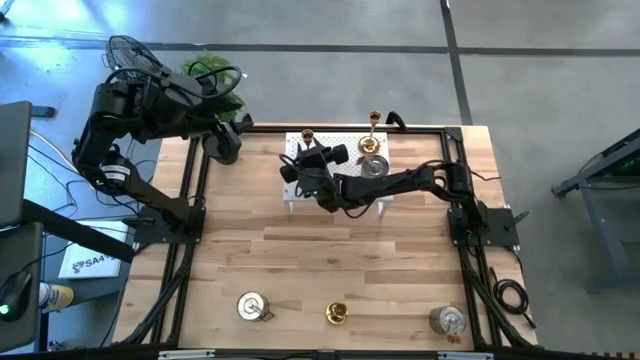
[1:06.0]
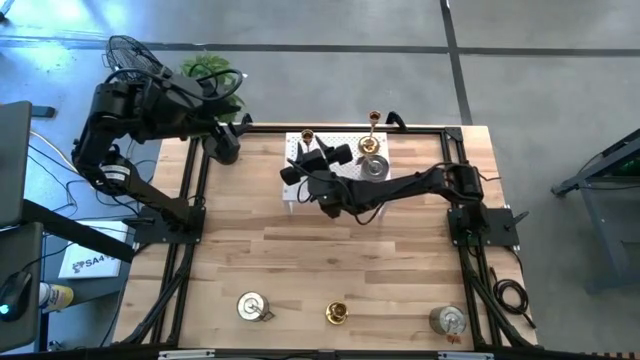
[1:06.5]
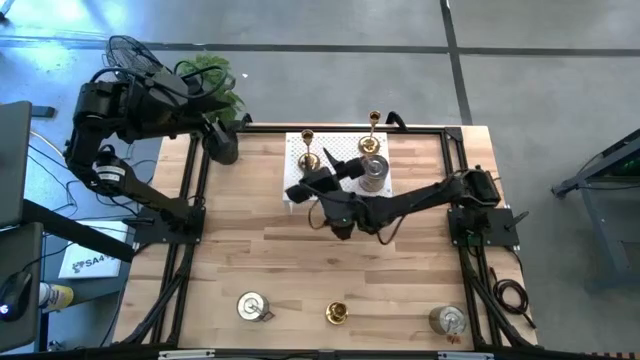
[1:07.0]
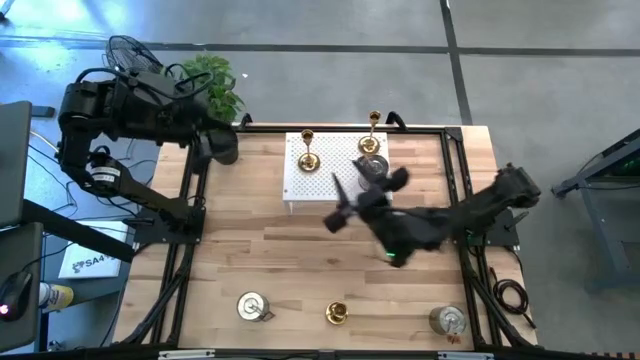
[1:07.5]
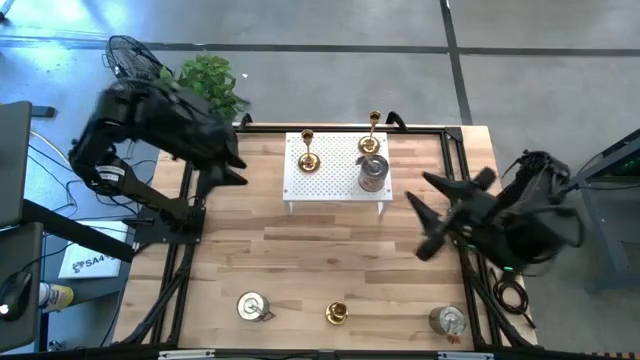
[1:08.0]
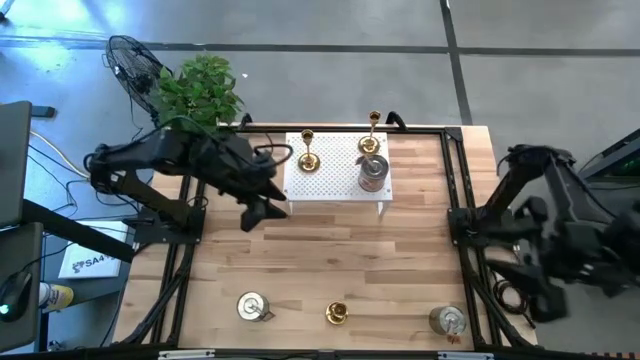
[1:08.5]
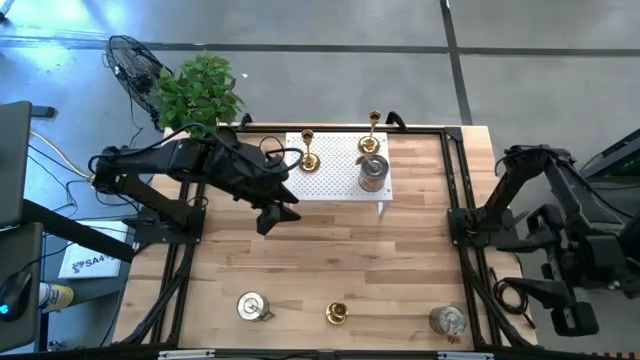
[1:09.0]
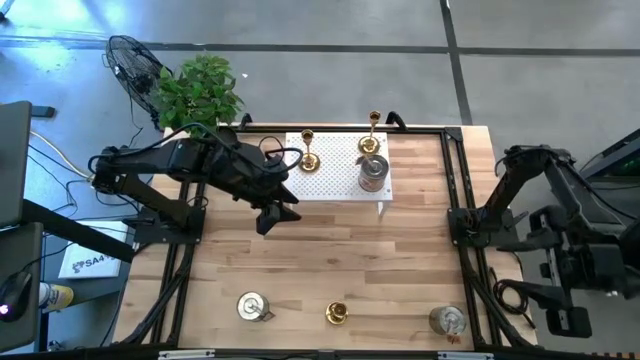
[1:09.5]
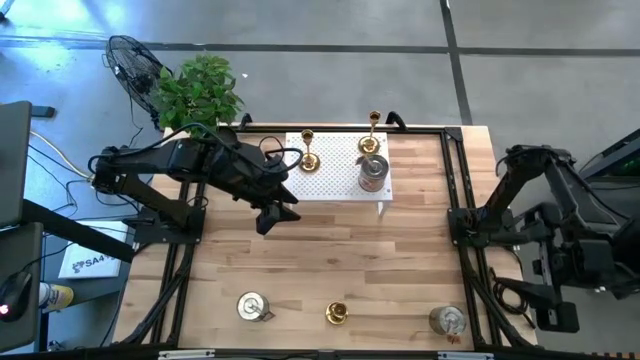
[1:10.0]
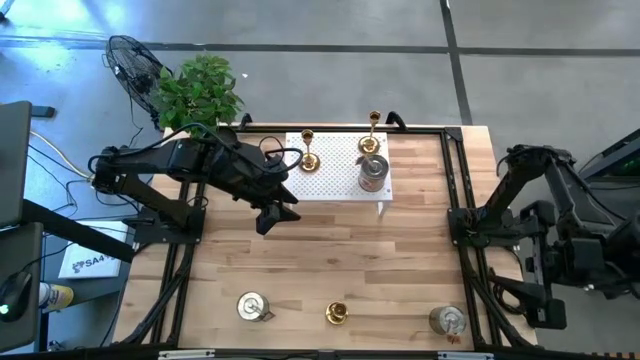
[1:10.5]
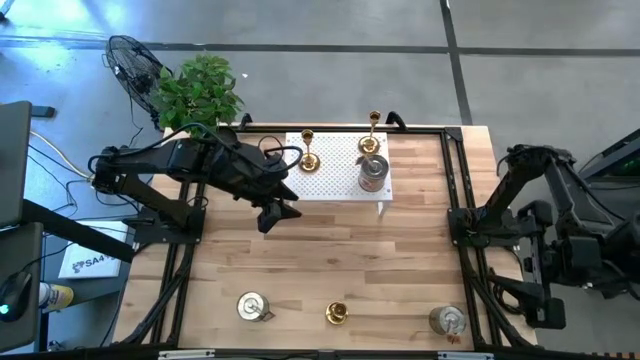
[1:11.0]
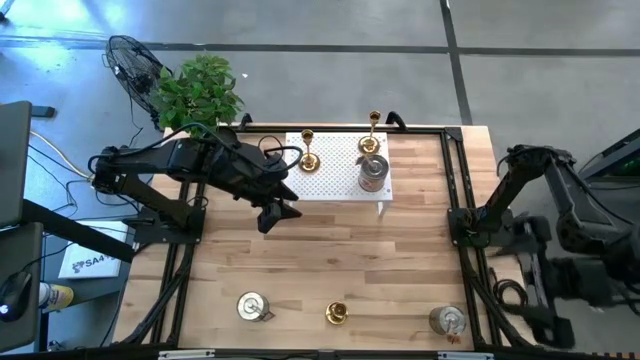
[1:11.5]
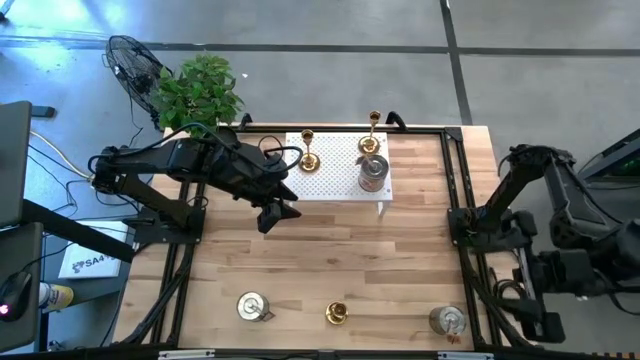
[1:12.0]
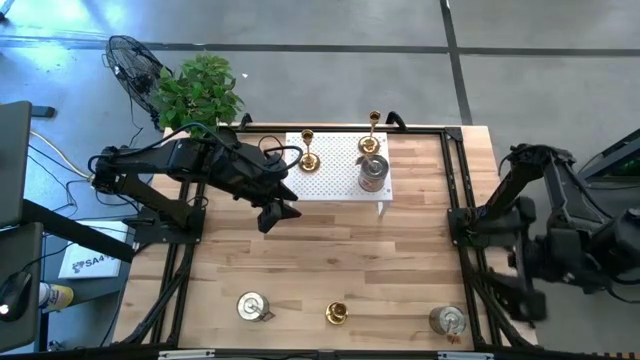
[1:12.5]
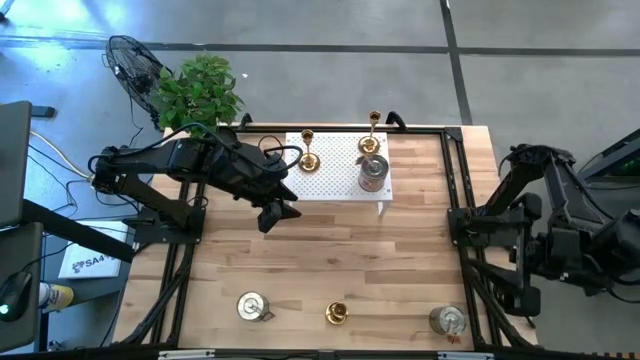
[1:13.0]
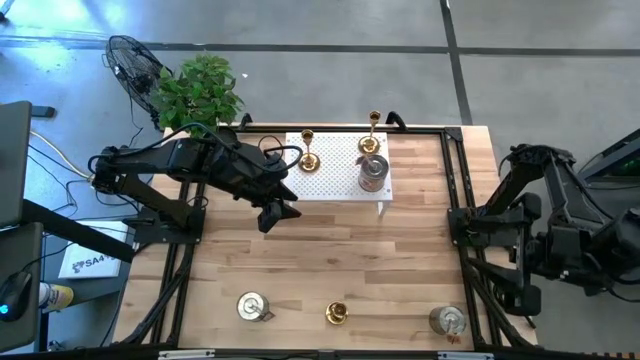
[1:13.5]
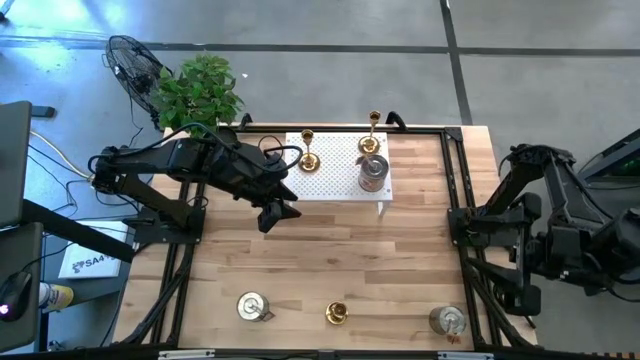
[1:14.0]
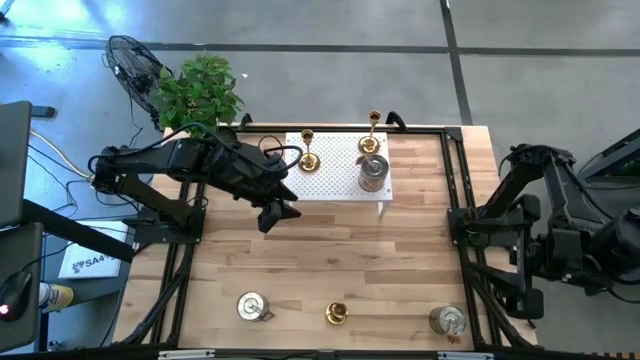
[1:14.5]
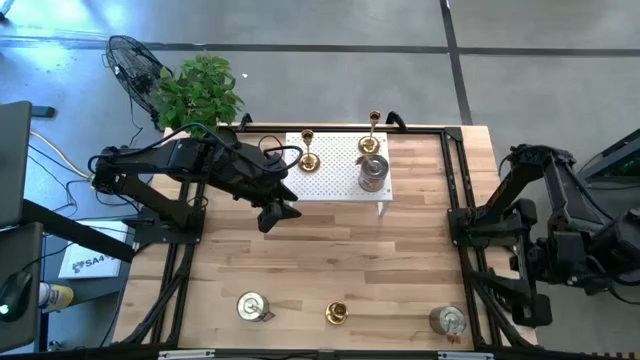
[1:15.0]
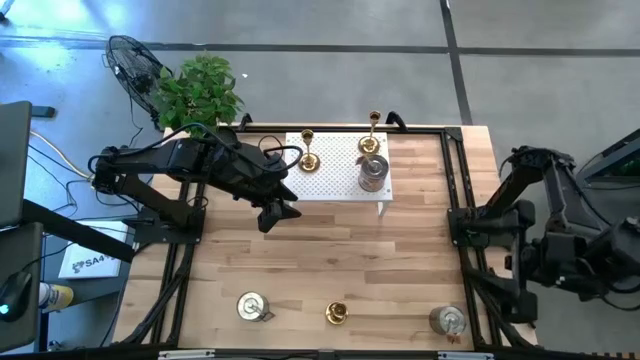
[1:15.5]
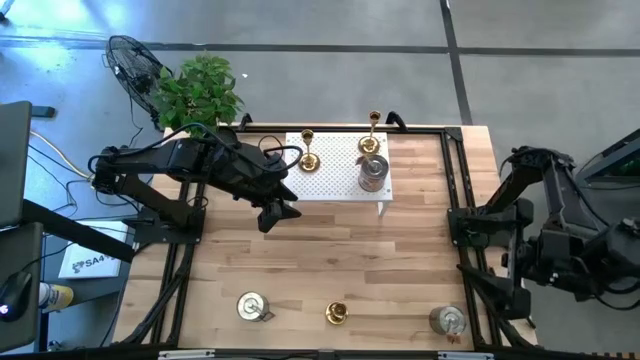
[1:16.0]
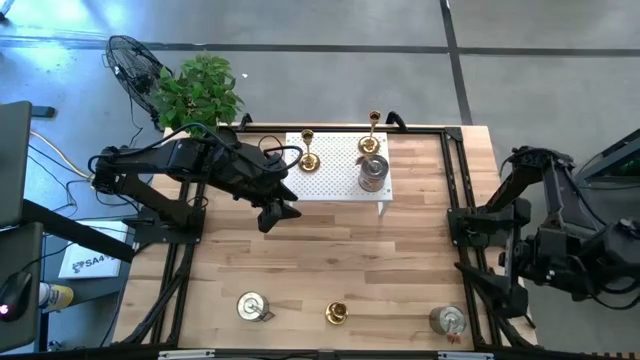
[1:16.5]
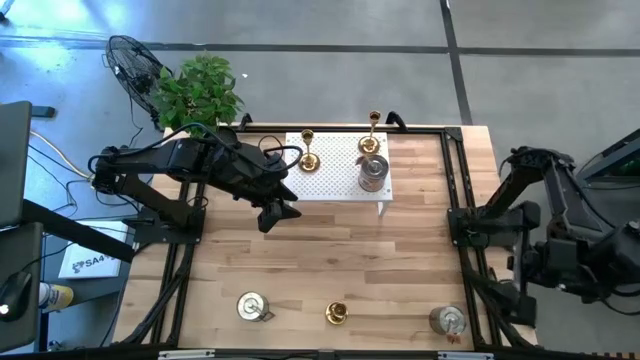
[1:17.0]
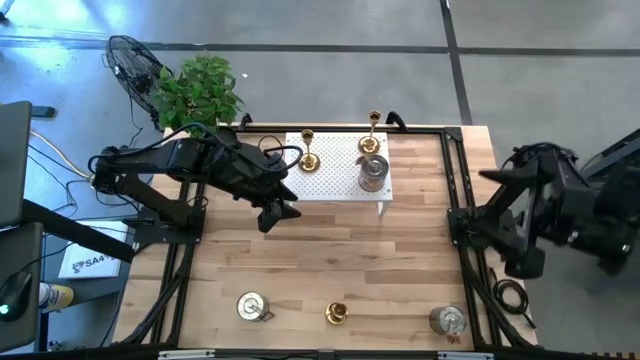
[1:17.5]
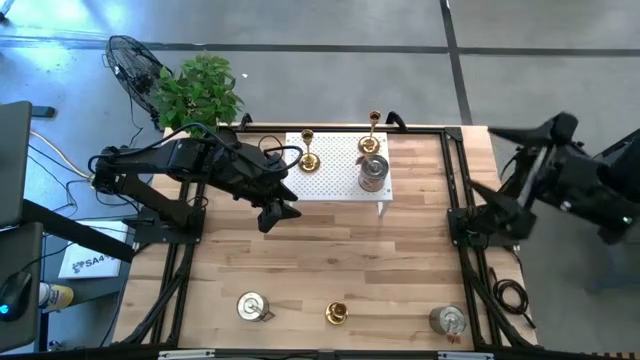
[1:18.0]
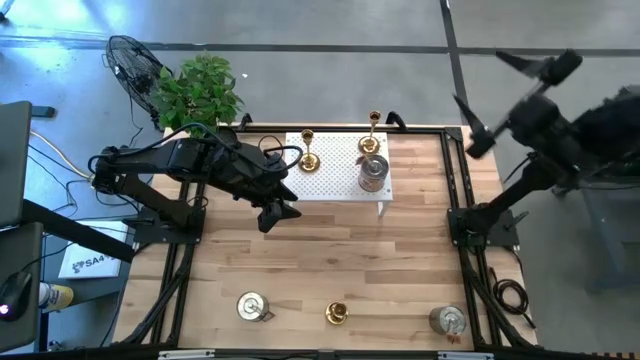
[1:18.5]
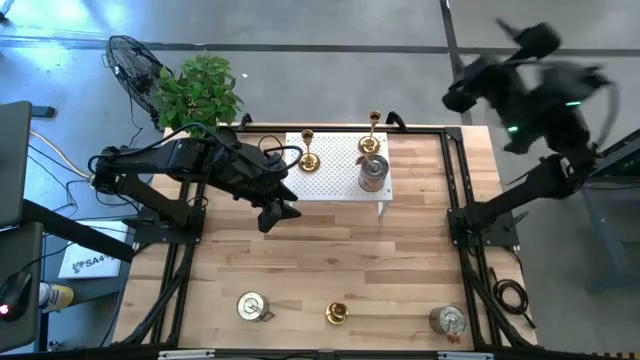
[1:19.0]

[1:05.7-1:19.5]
Task: Pick & Place candle stick holders
Align the right silver scented candle with the other silver scented candle on the shelf

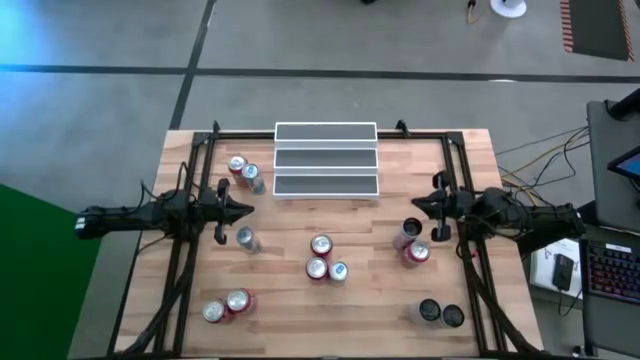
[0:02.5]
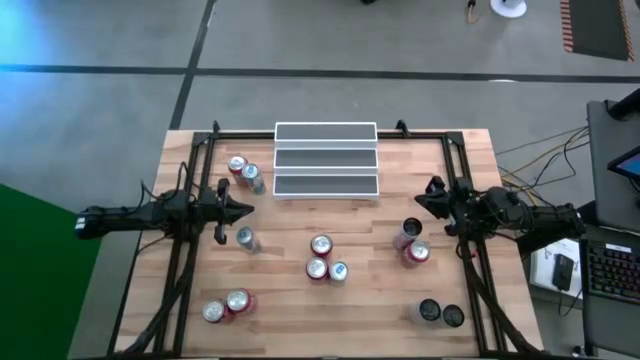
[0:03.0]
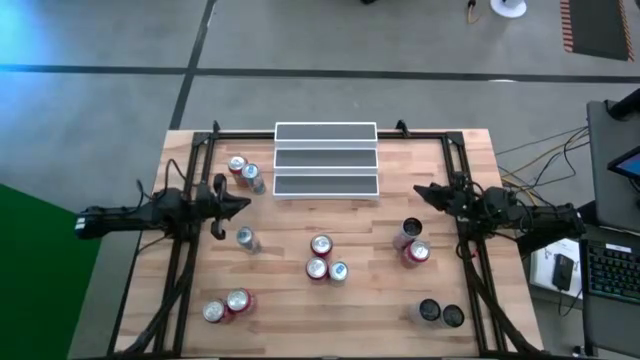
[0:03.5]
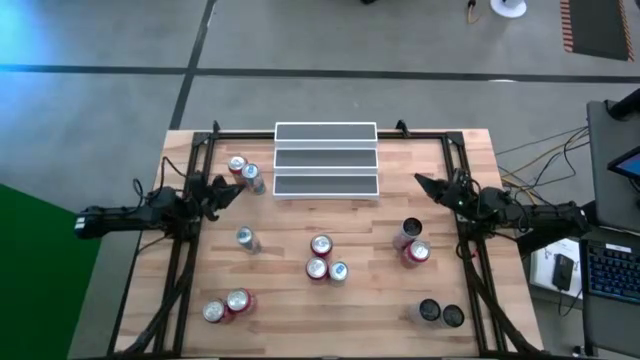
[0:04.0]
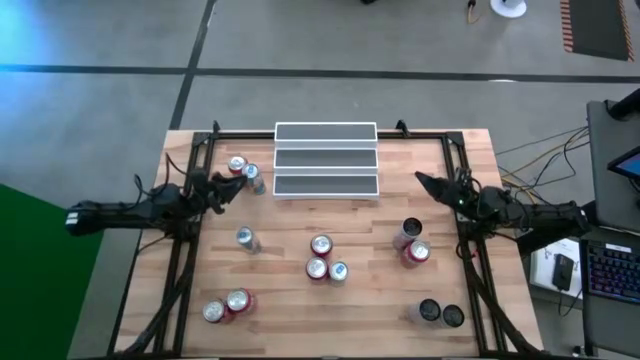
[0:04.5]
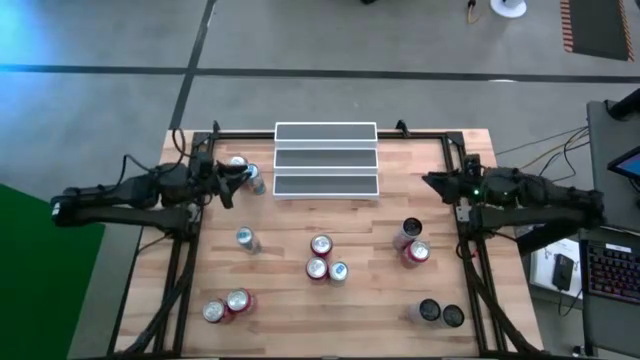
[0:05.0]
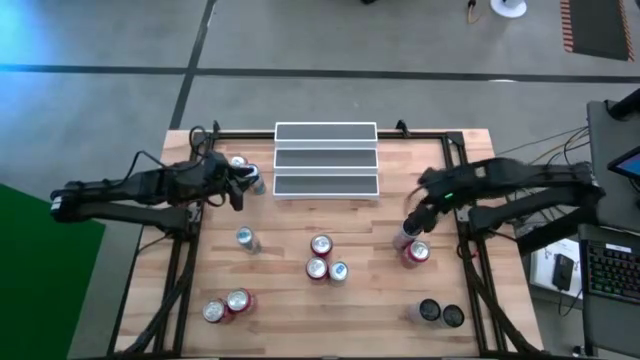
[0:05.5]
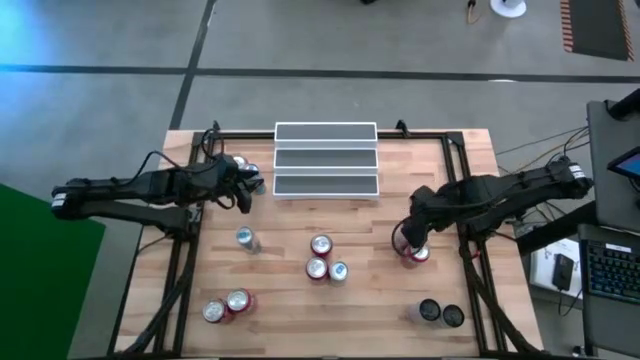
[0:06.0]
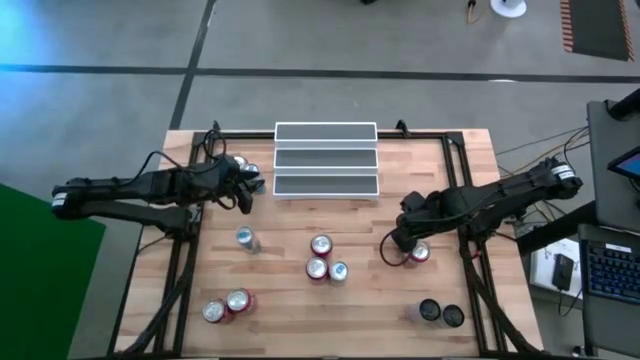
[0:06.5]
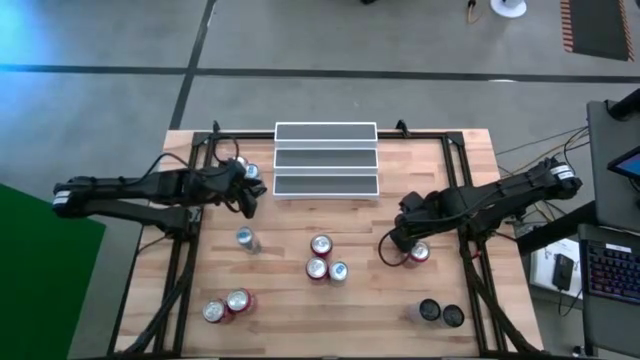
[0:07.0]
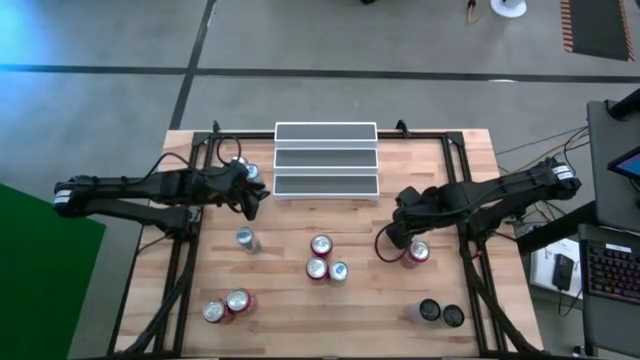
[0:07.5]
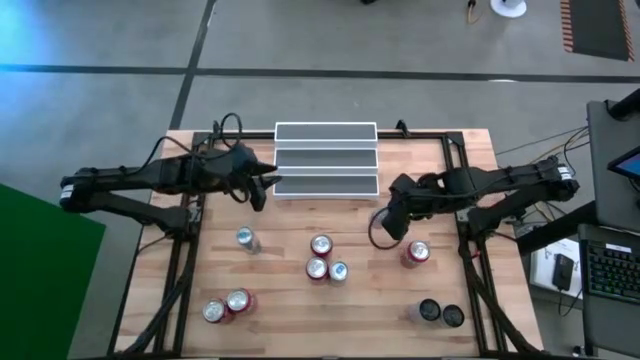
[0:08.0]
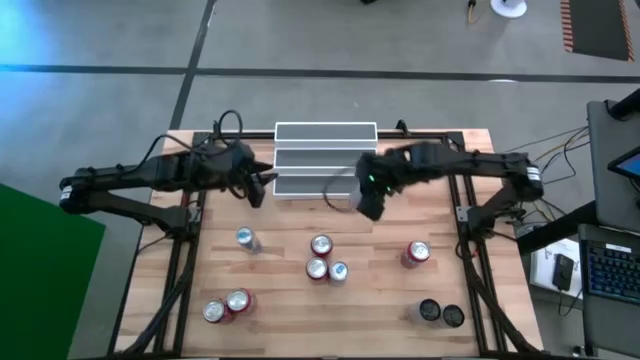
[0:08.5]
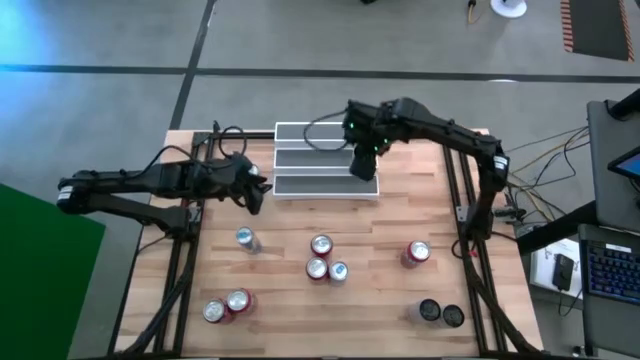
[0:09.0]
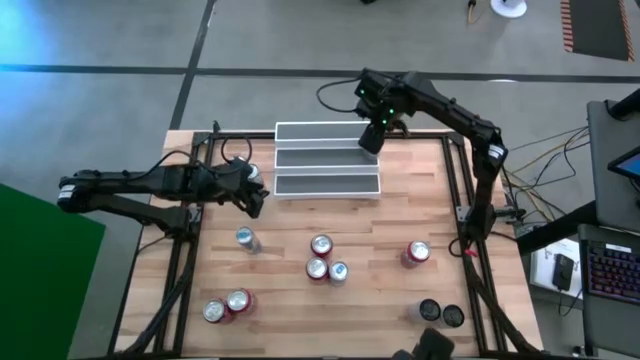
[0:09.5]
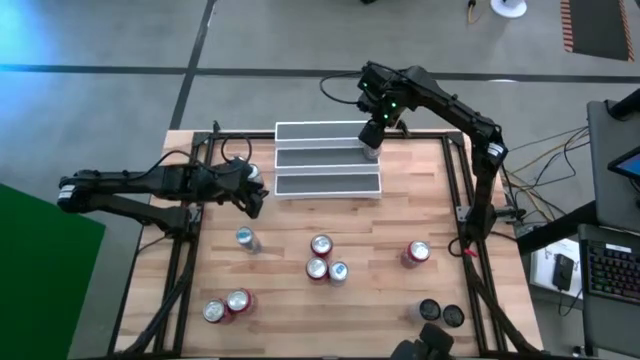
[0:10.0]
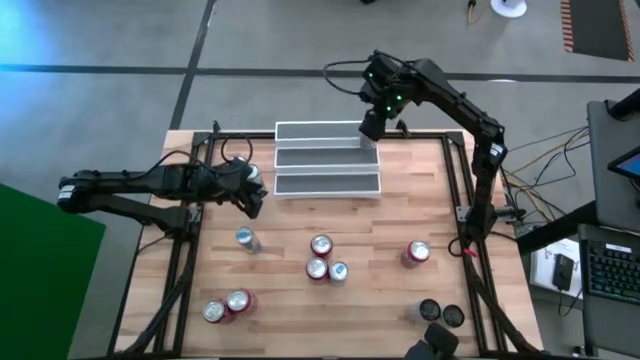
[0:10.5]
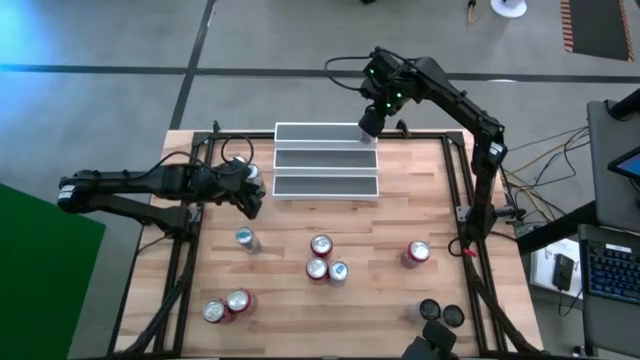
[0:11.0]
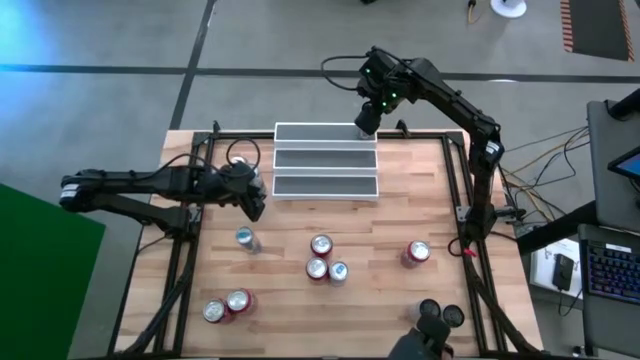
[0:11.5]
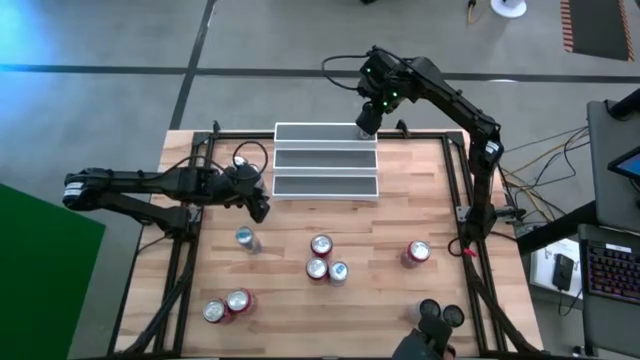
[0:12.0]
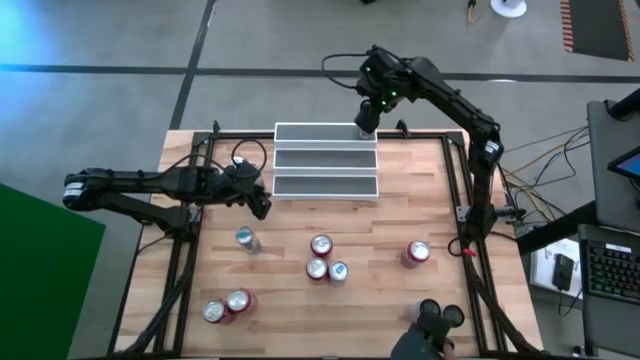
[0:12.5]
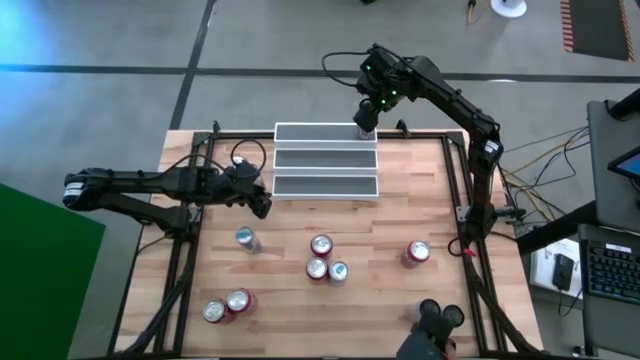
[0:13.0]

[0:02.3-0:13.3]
Task: Place canned beverage on shelf
Put the top white soda can on the top tier of the shelf
